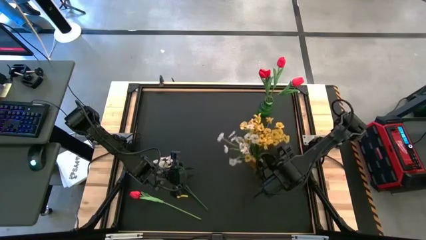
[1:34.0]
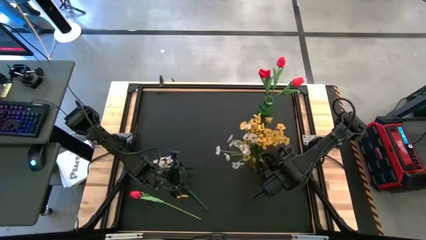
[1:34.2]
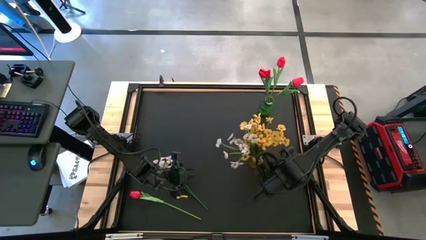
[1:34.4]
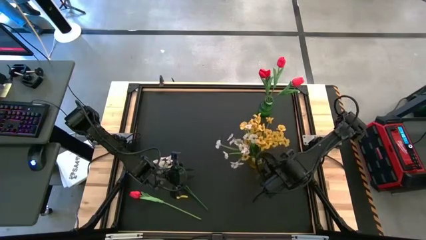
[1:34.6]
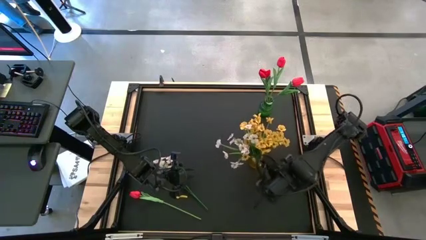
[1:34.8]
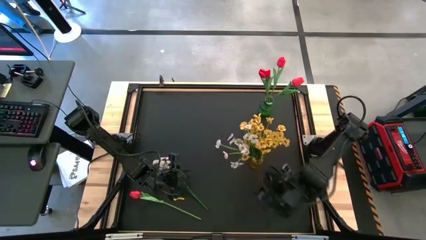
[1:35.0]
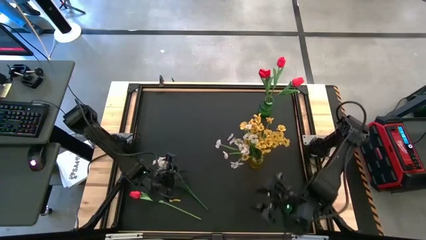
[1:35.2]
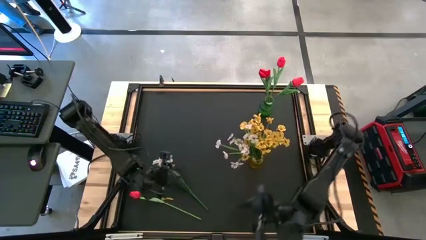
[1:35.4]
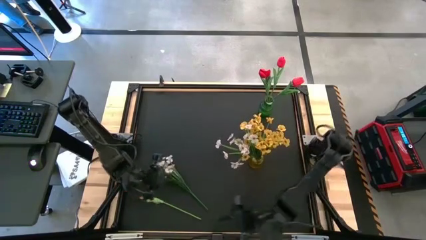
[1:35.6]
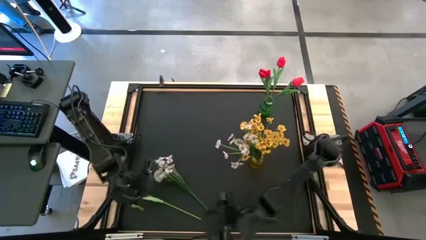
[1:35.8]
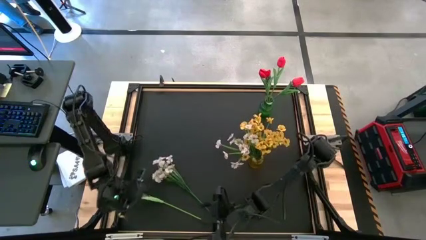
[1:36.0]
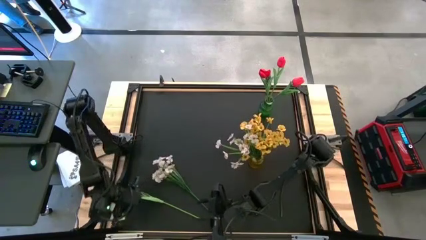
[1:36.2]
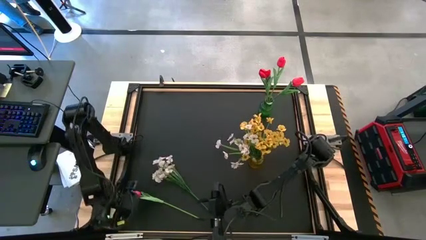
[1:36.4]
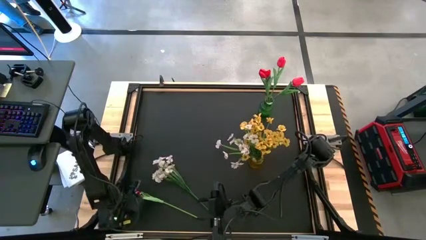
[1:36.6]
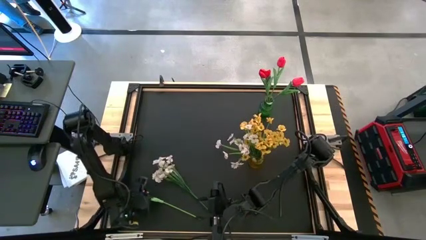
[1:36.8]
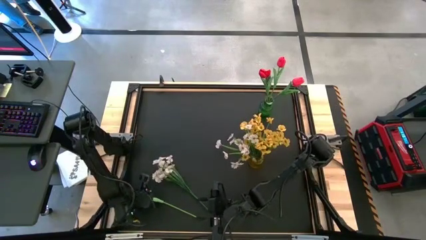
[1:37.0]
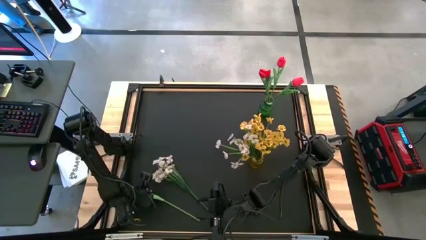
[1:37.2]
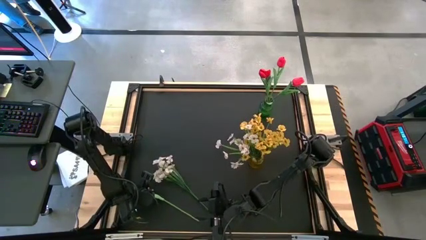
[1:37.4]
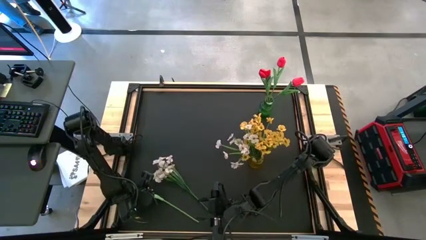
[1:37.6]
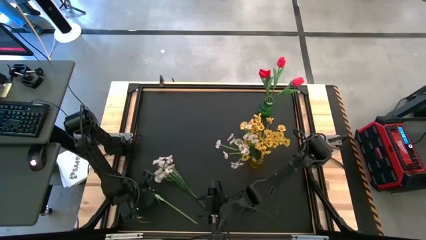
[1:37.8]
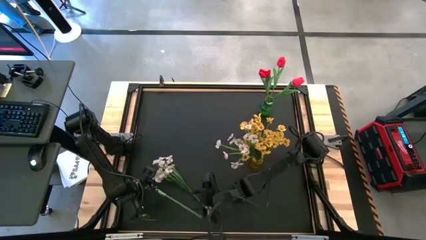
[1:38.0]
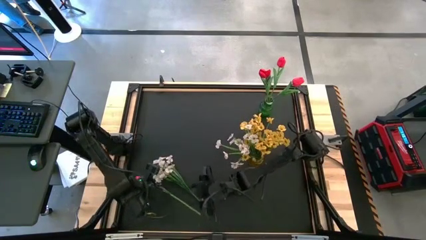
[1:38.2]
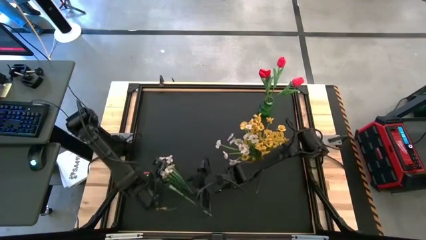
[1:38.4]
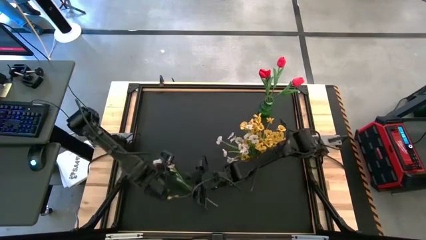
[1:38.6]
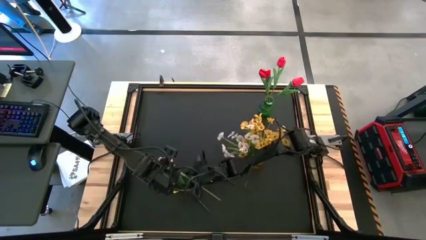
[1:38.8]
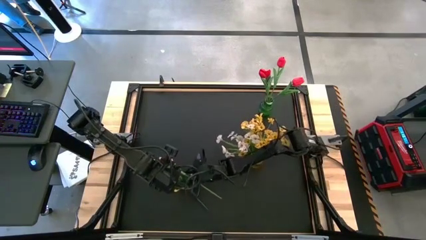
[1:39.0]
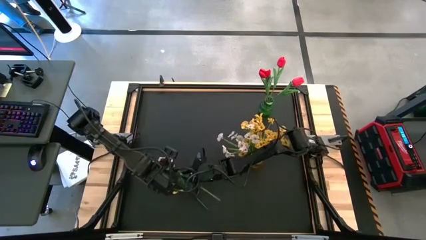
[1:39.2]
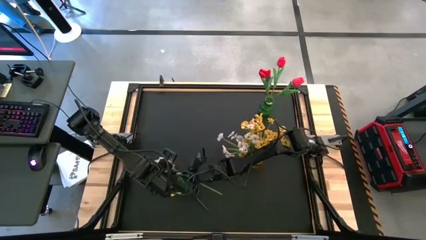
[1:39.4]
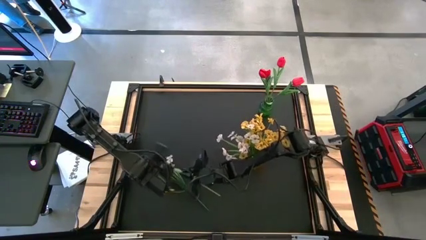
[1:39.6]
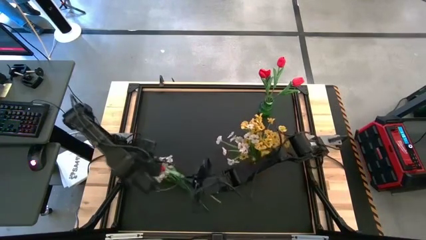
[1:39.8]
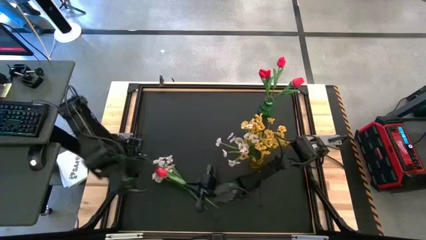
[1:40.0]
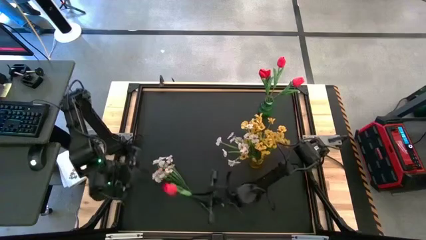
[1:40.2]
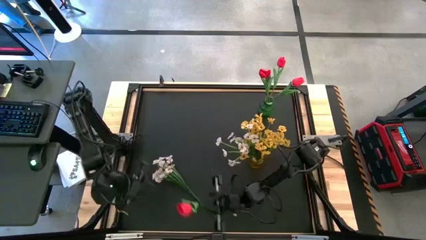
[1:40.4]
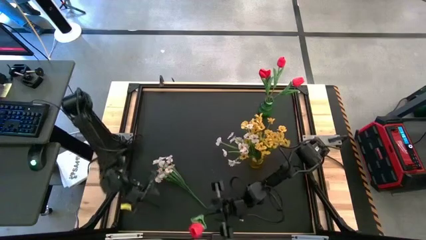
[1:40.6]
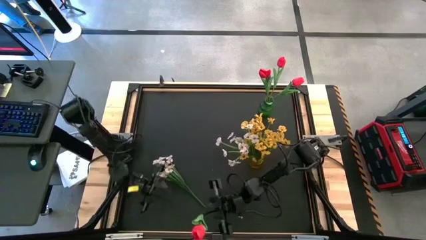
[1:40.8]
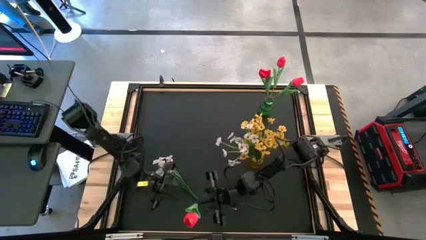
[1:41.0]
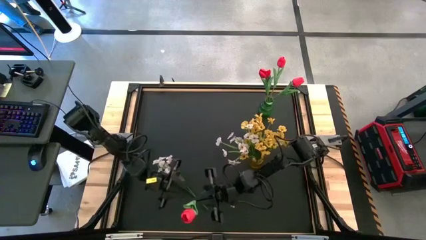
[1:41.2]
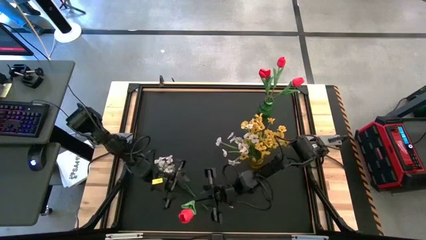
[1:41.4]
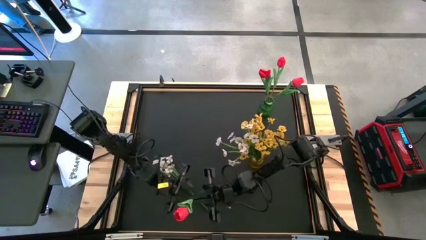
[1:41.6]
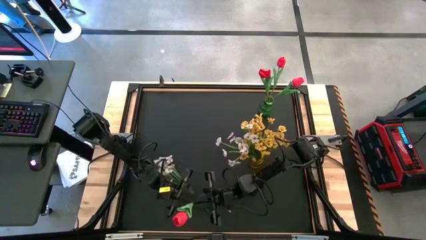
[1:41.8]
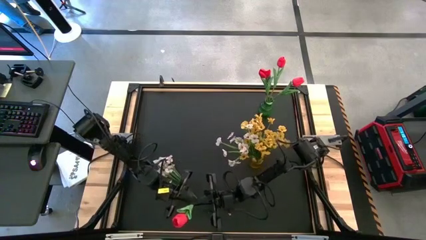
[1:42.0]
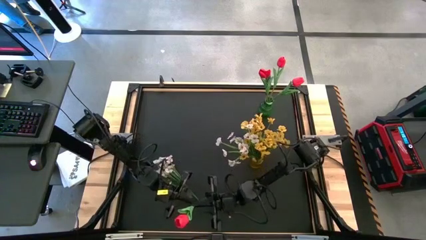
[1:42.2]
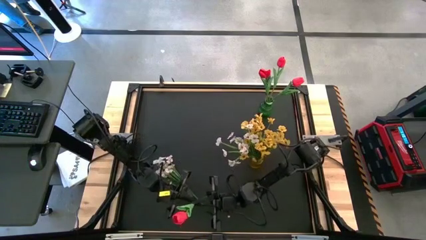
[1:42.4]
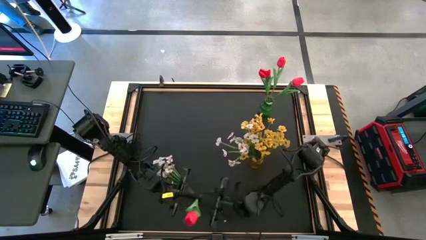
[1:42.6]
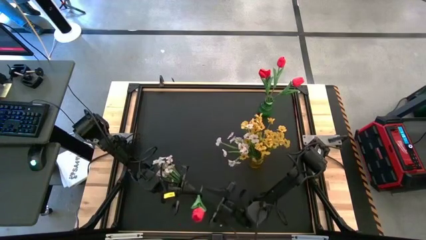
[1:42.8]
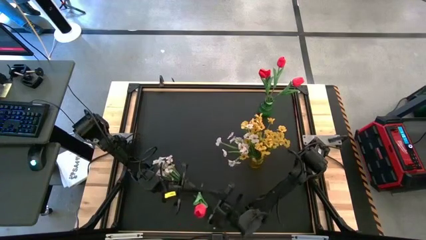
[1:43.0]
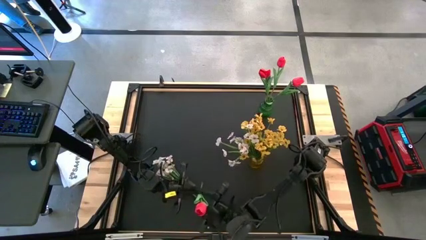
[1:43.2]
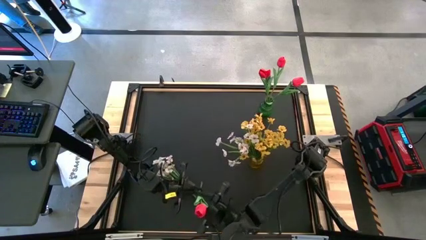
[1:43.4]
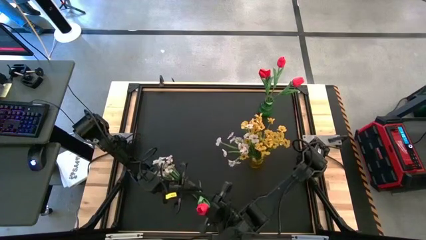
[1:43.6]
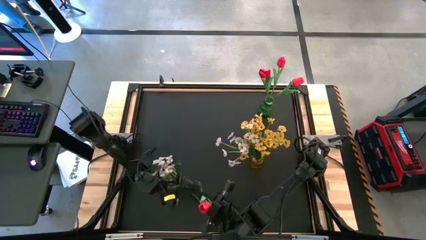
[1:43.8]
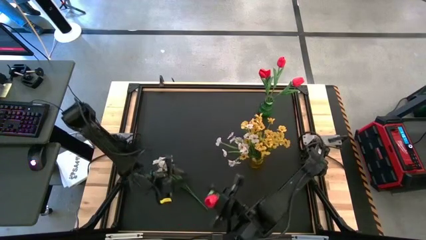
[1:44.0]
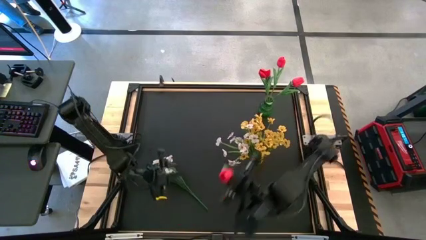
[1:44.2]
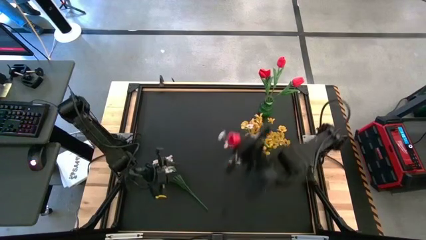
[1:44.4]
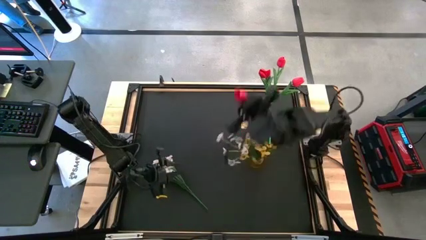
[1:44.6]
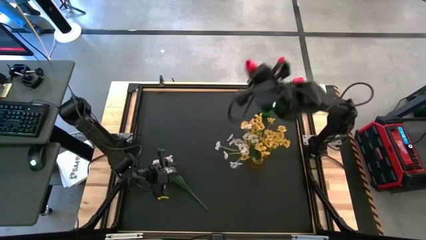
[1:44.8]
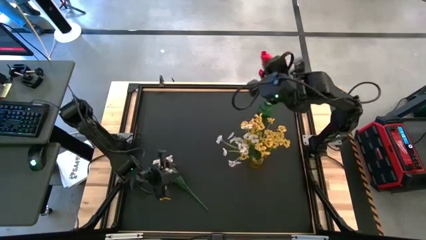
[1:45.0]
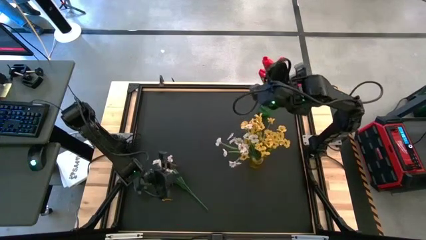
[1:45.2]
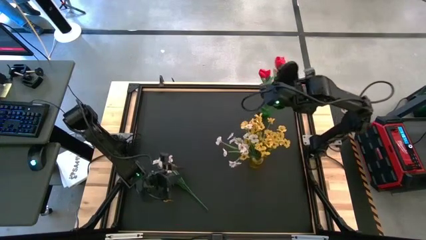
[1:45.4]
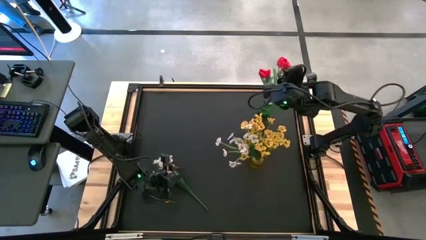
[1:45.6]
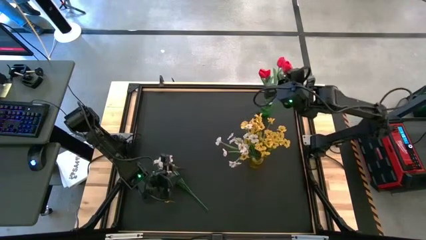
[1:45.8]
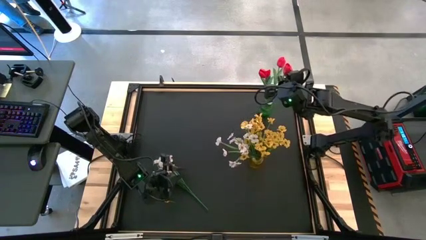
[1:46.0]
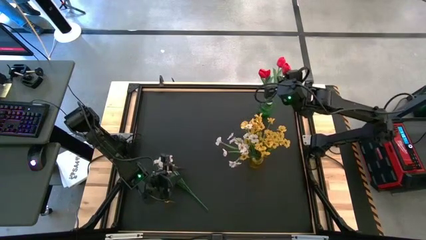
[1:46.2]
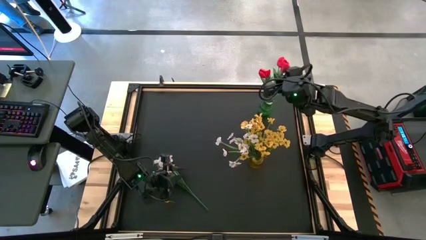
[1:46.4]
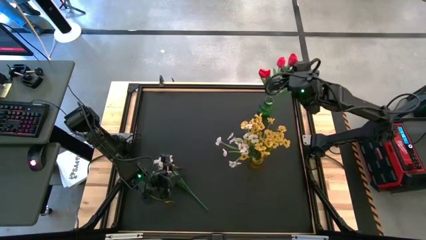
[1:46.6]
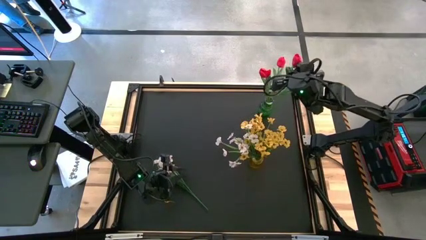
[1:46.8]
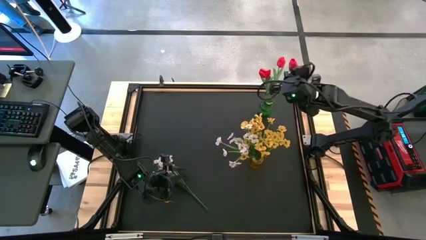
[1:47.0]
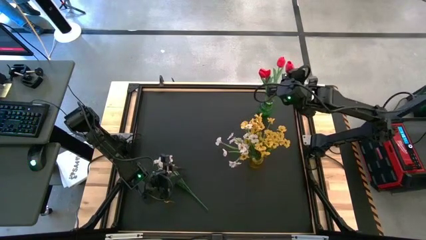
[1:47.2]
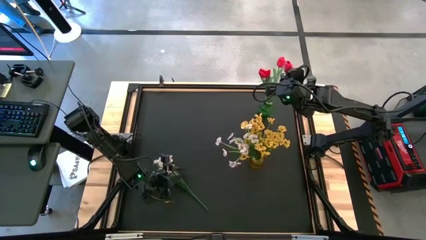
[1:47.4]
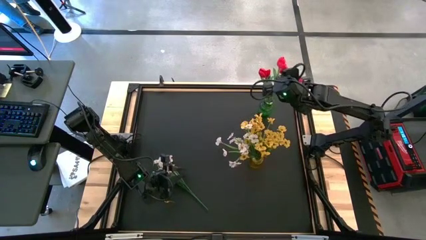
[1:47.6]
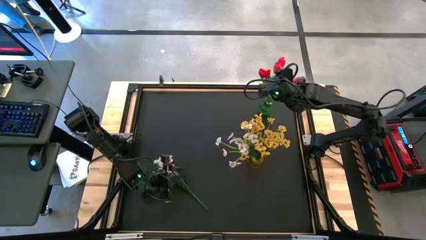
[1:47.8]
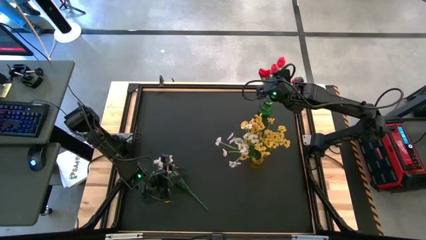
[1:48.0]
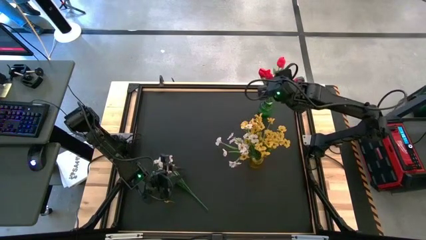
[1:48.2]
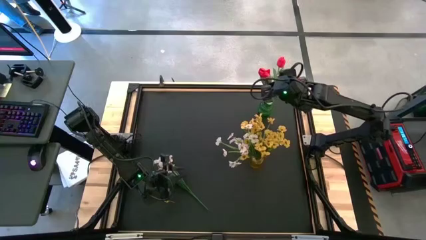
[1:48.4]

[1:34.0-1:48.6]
Task: Sort flowers into vase by color
Put the red flower into the green vase
